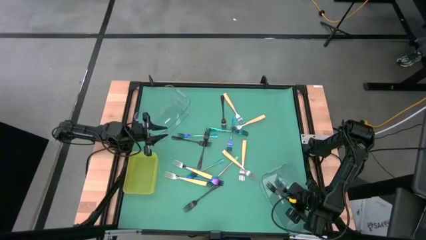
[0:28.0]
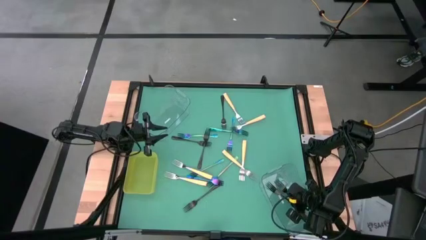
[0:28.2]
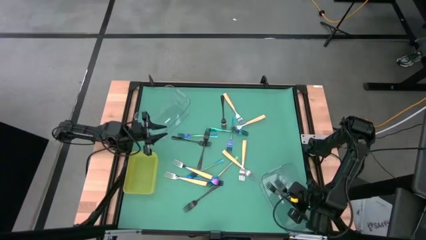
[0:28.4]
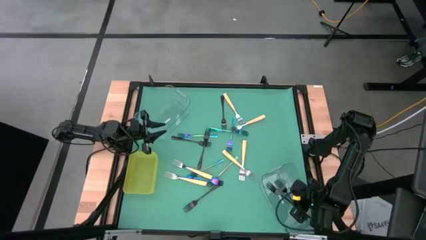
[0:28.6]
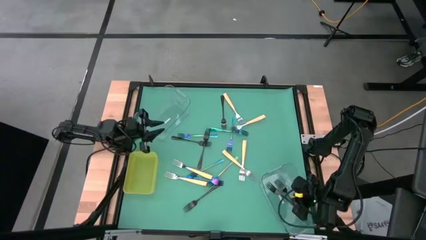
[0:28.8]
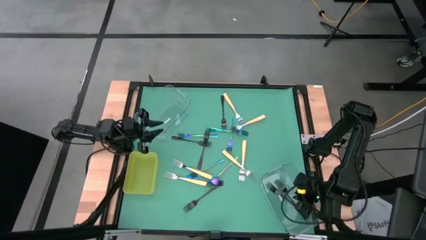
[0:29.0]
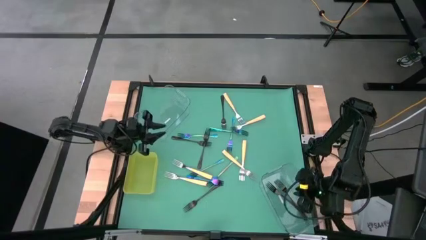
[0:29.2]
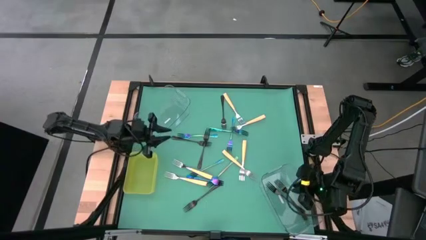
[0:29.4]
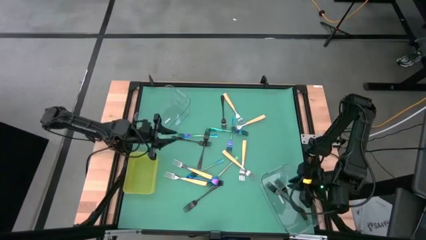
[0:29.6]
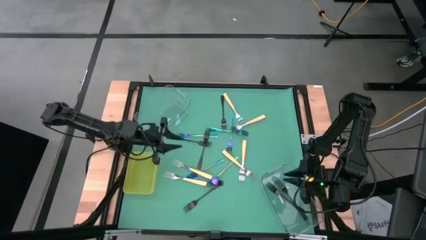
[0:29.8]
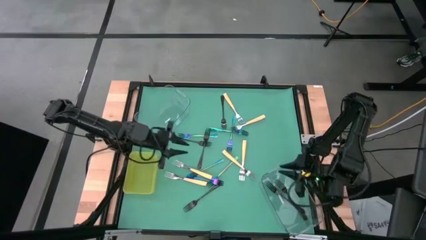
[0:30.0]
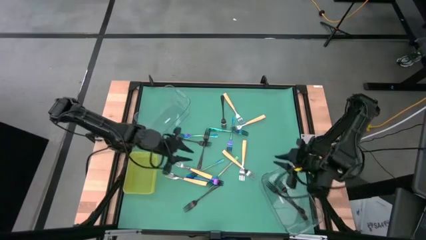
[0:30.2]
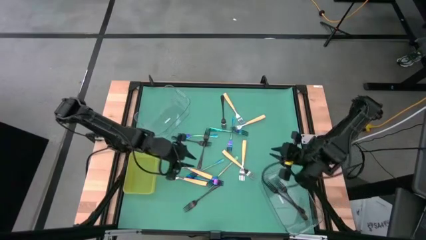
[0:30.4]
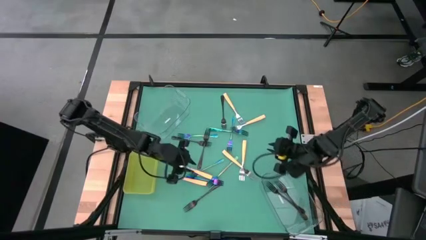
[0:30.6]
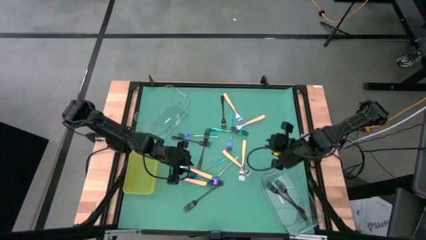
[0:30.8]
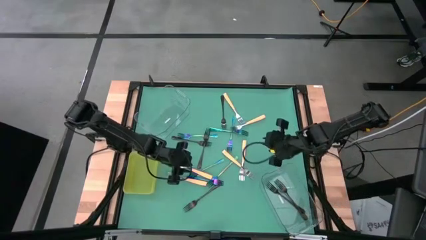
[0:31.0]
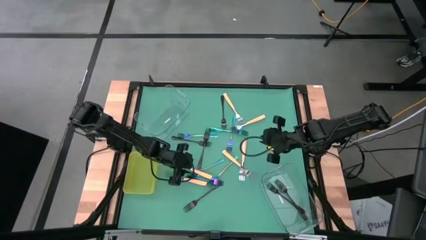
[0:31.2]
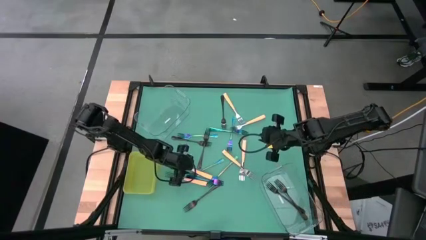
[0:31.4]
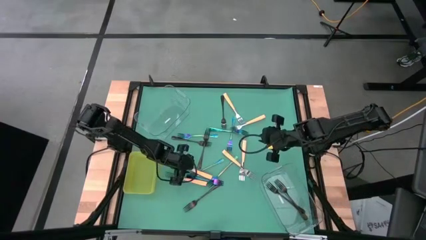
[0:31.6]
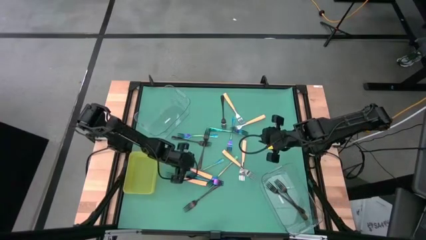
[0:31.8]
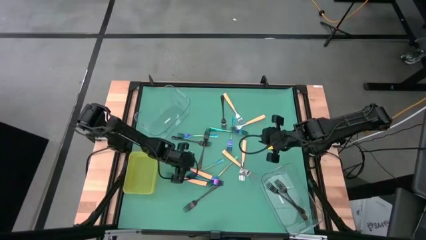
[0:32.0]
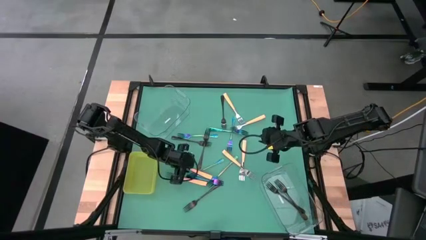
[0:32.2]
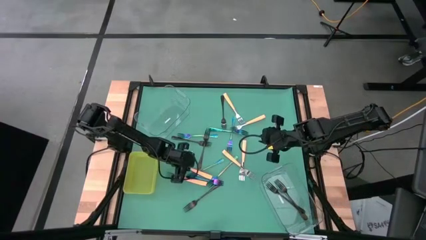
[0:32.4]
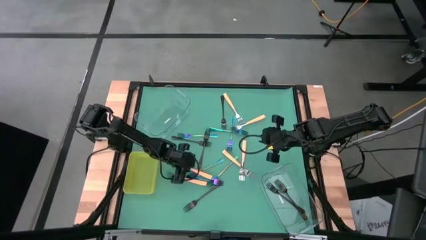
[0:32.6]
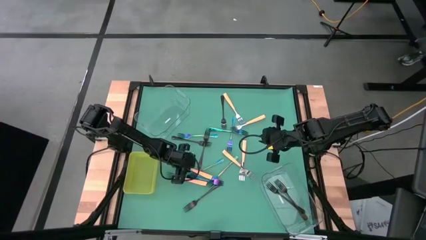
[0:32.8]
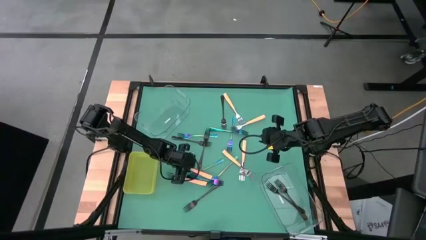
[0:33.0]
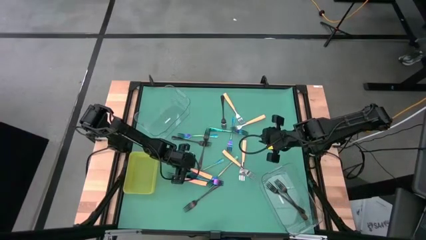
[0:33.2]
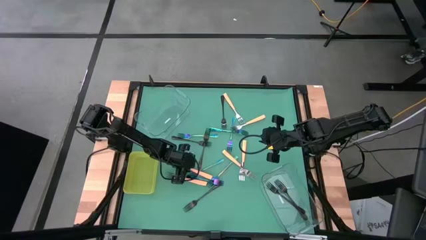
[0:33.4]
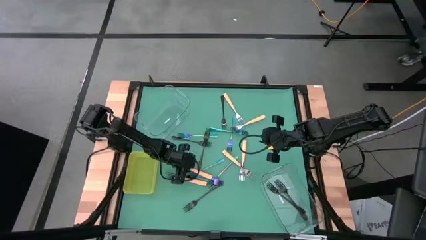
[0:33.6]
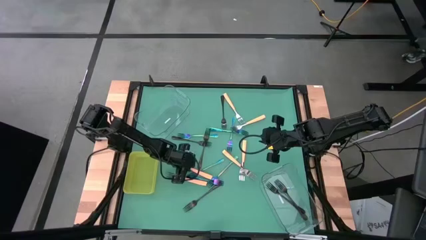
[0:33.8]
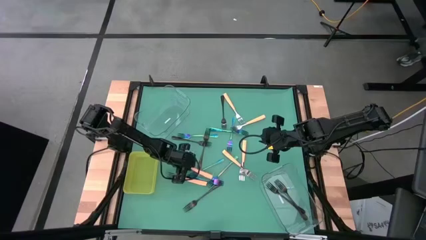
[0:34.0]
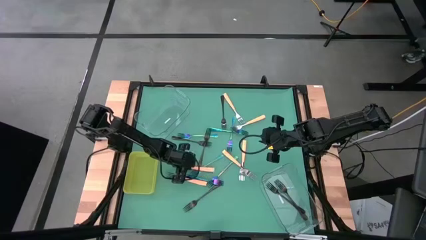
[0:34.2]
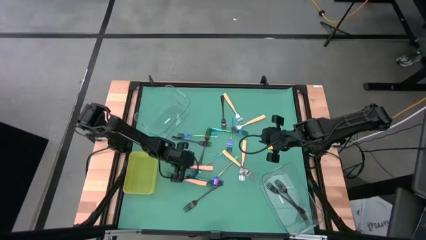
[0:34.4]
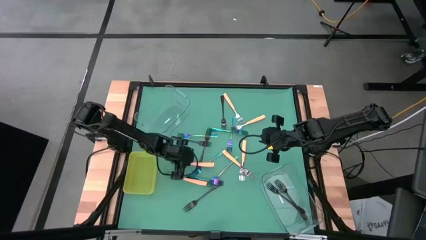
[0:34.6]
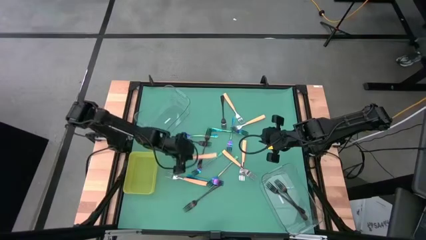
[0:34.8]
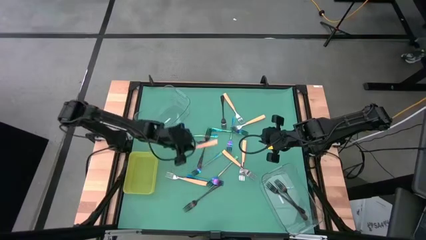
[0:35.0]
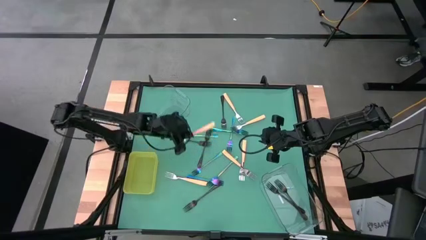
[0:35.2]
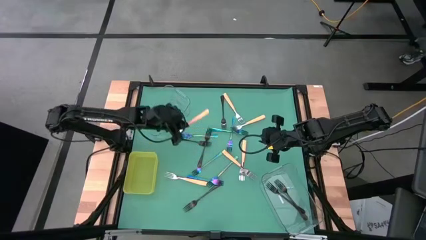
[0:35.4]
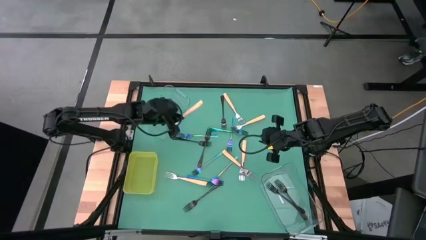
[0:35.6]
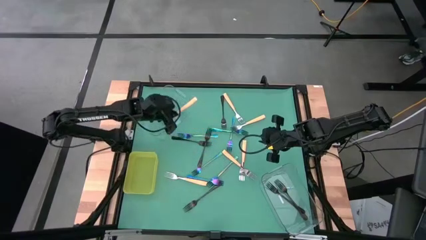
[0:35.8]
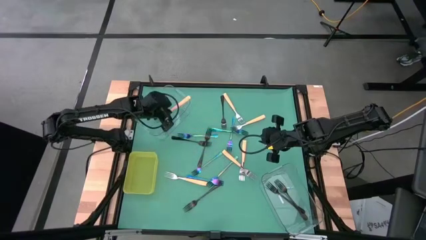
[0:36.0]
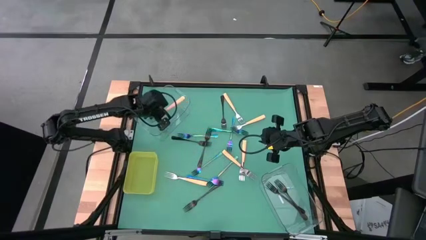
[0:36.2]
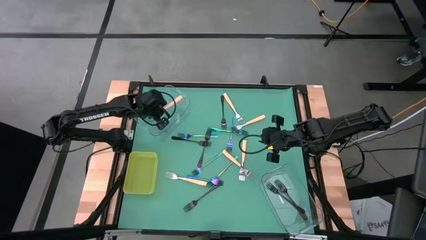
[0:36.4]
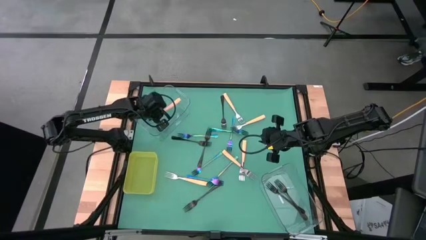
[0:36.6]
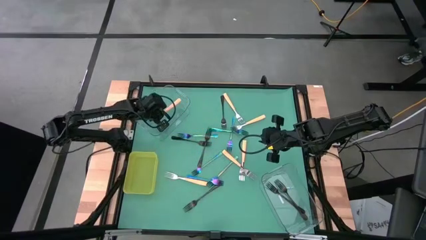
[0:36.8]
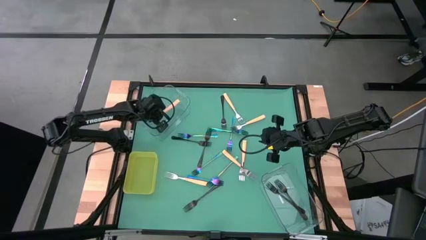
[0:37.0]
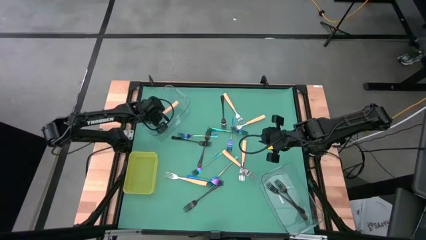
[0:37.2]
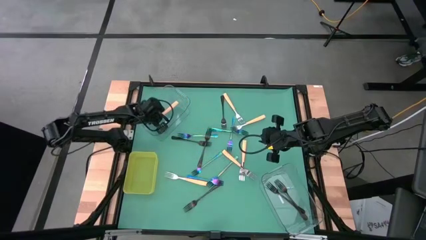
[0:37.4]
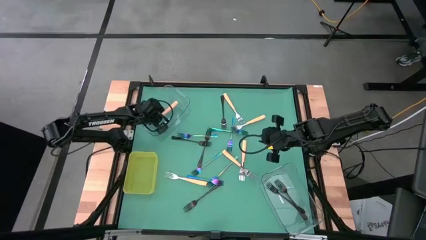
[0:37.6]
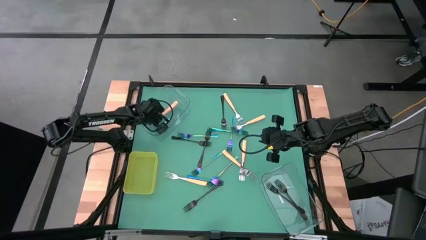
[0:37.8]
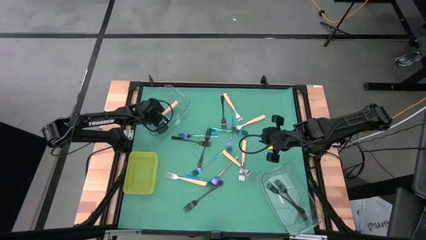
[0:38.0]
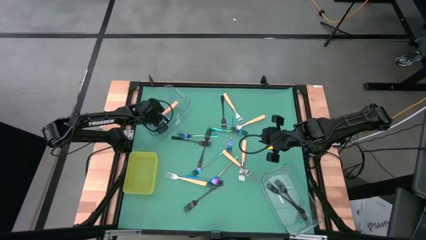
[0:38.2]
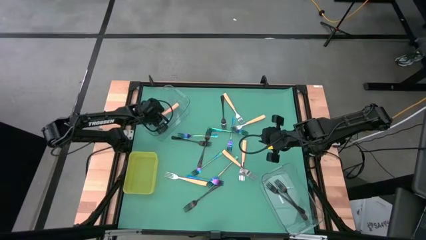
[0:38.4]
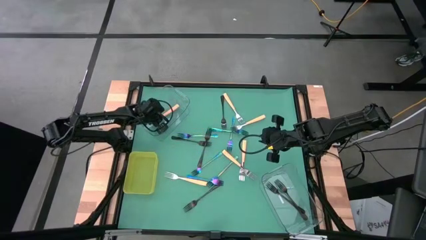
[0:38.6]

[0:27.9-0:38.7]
Task: Sort silverware by color (type)
Put the orange fork in the top transparent bin
